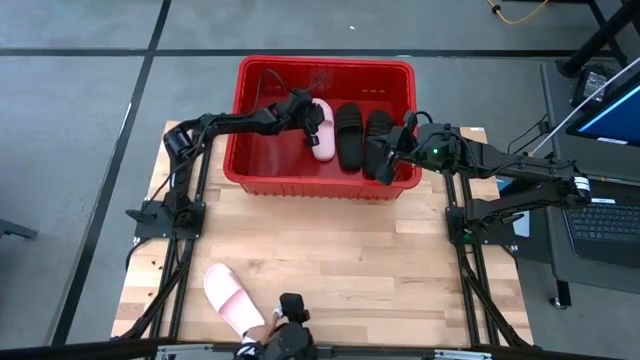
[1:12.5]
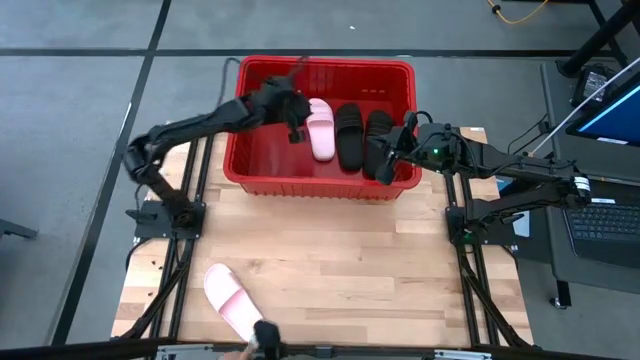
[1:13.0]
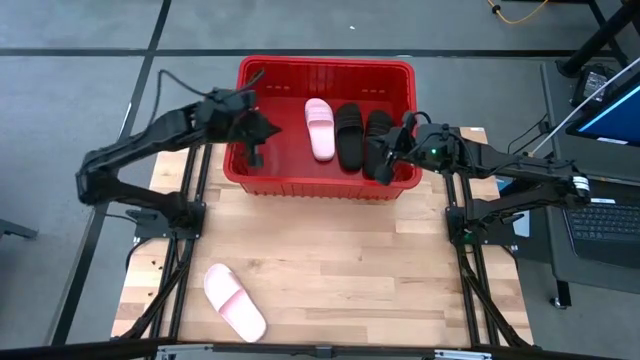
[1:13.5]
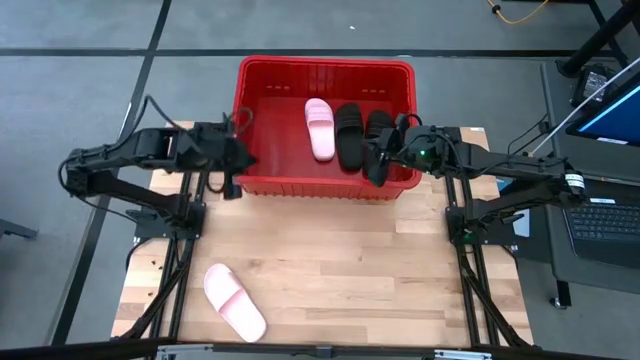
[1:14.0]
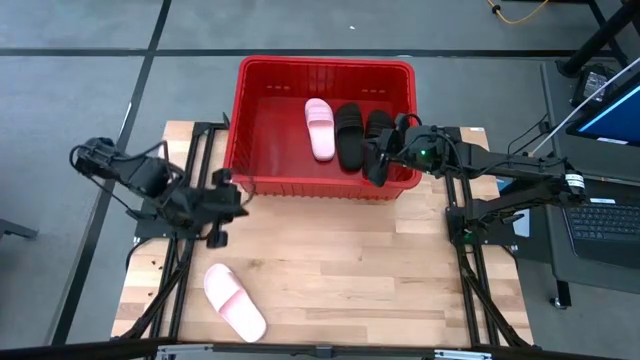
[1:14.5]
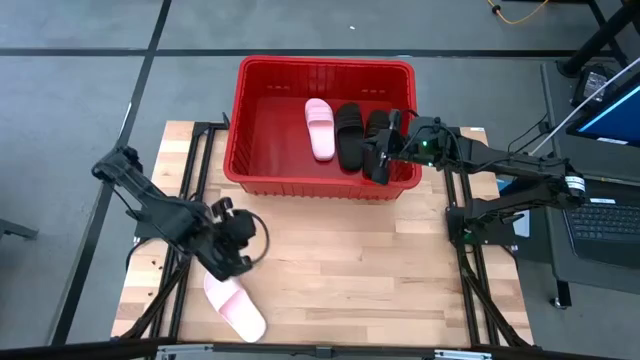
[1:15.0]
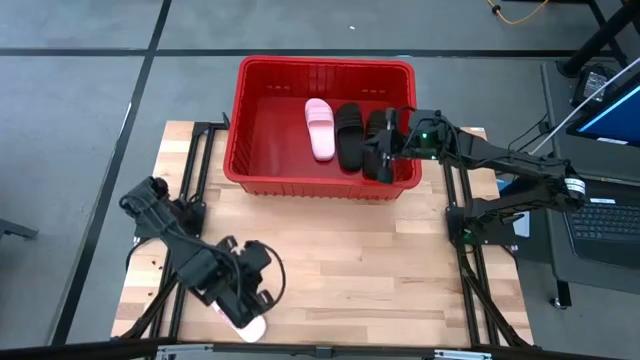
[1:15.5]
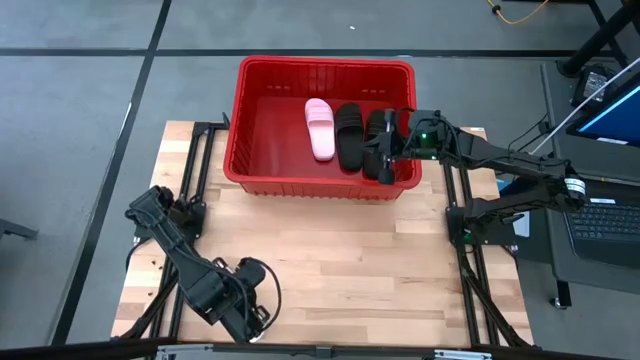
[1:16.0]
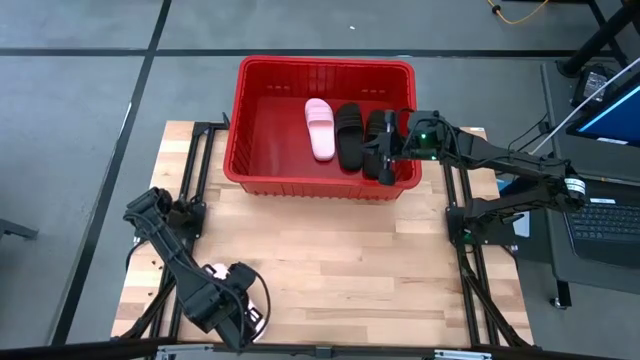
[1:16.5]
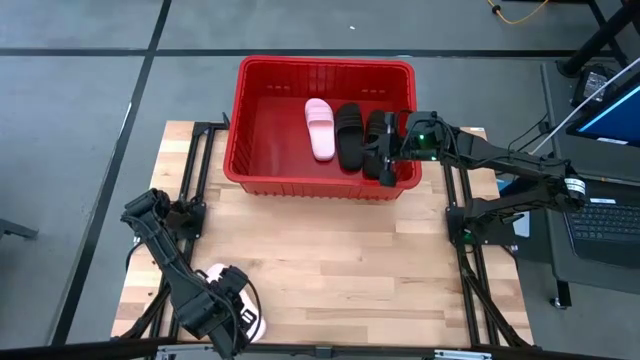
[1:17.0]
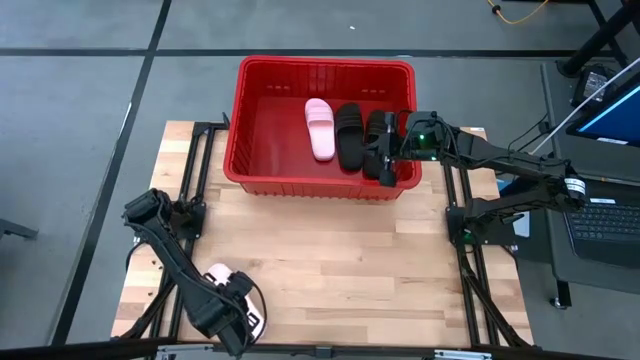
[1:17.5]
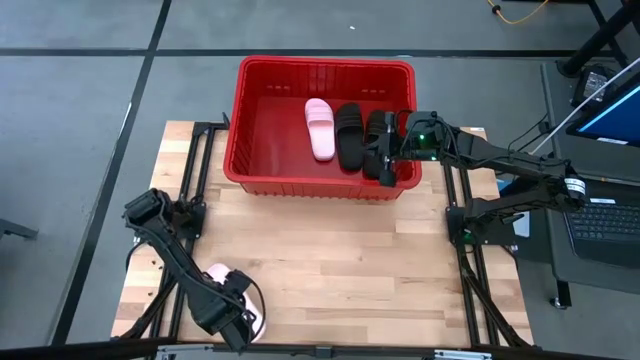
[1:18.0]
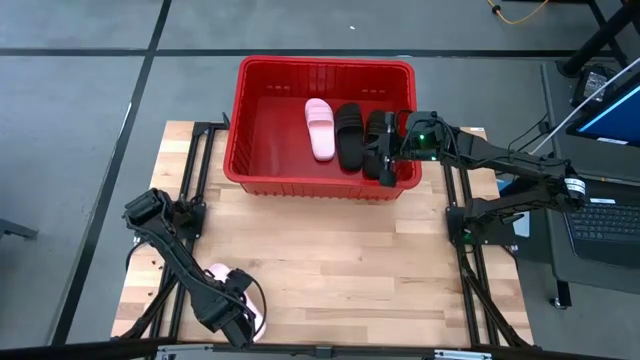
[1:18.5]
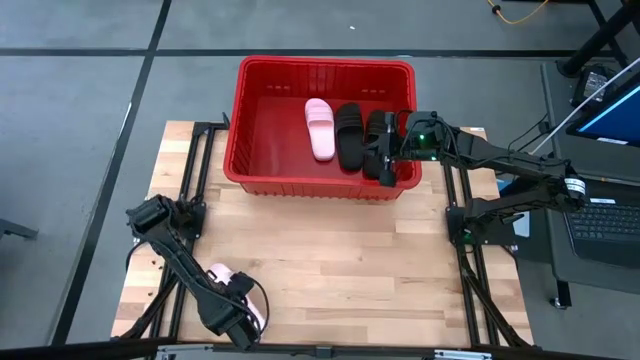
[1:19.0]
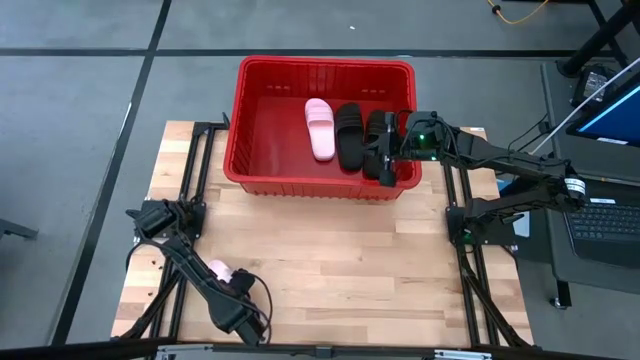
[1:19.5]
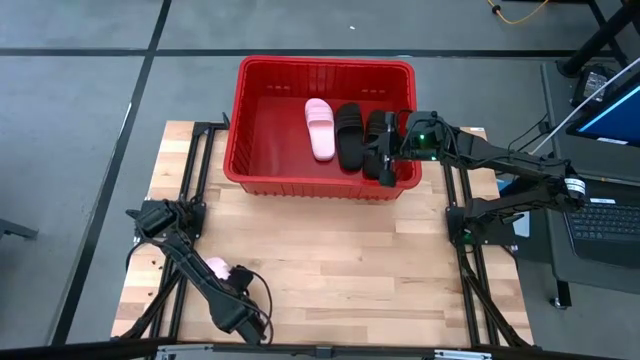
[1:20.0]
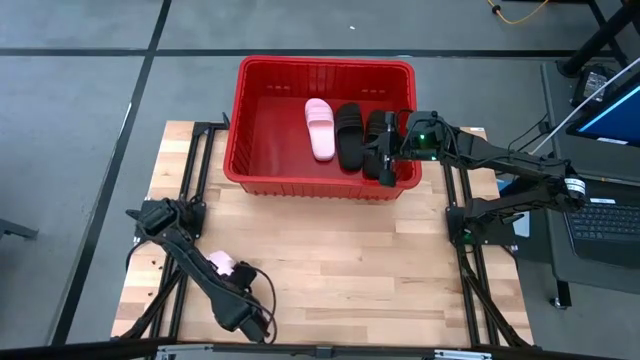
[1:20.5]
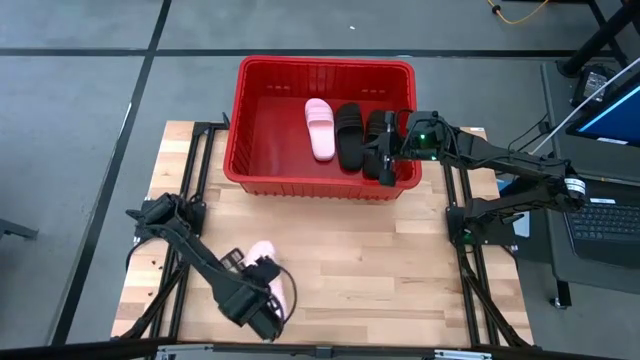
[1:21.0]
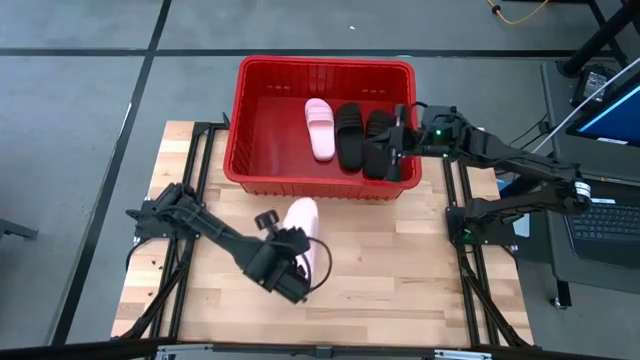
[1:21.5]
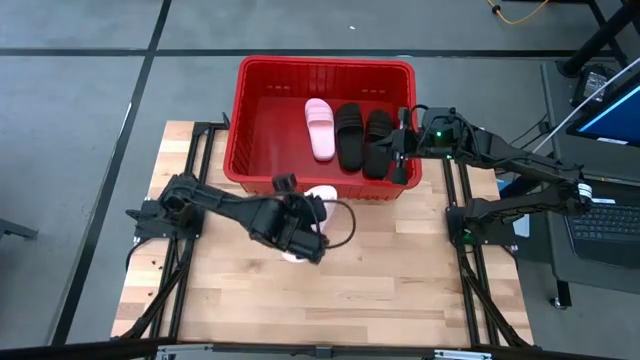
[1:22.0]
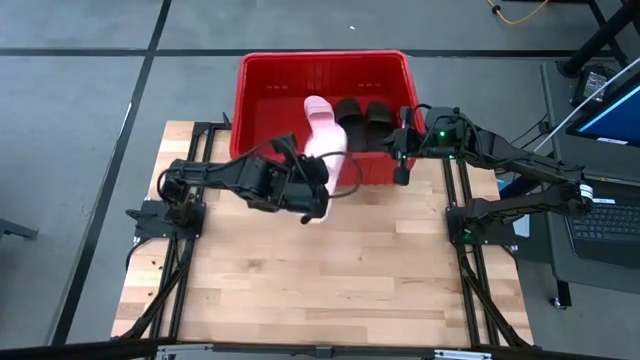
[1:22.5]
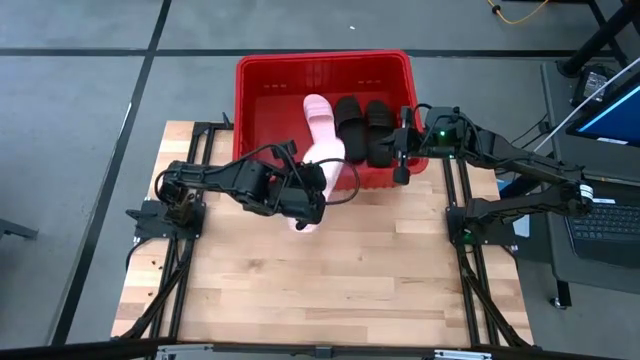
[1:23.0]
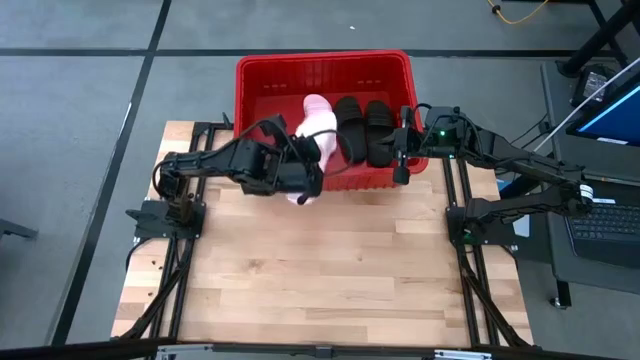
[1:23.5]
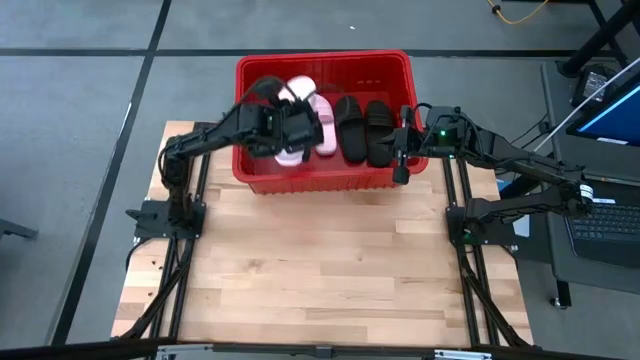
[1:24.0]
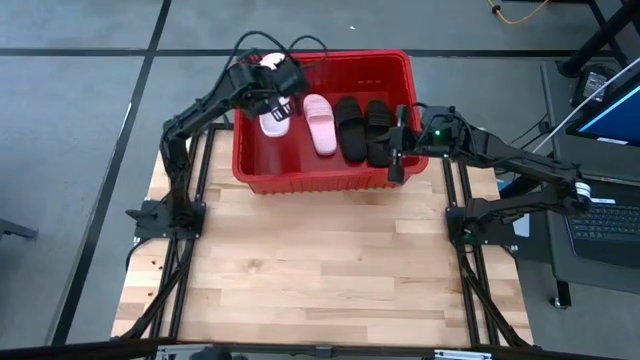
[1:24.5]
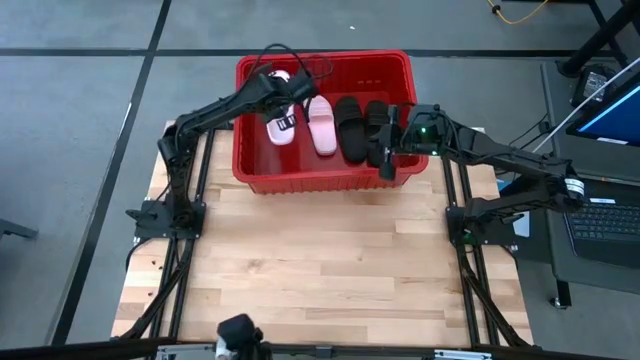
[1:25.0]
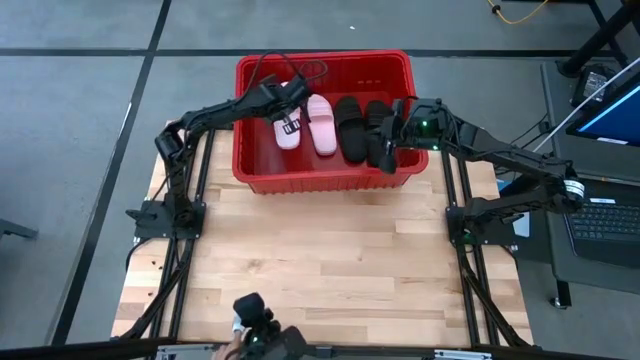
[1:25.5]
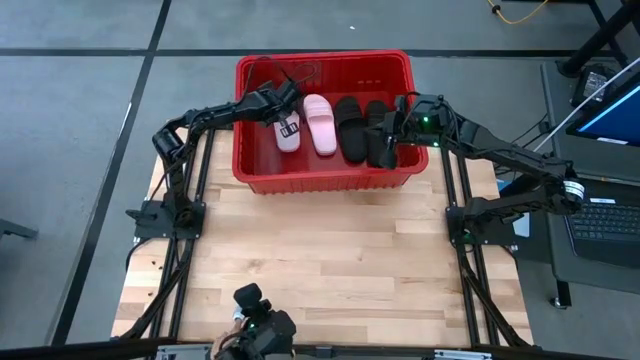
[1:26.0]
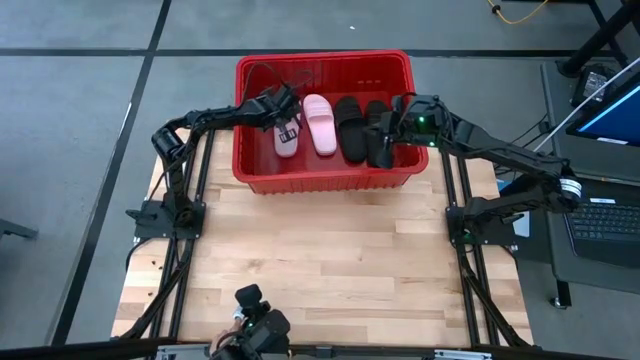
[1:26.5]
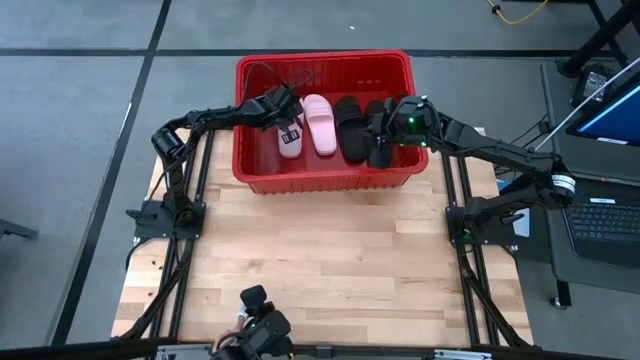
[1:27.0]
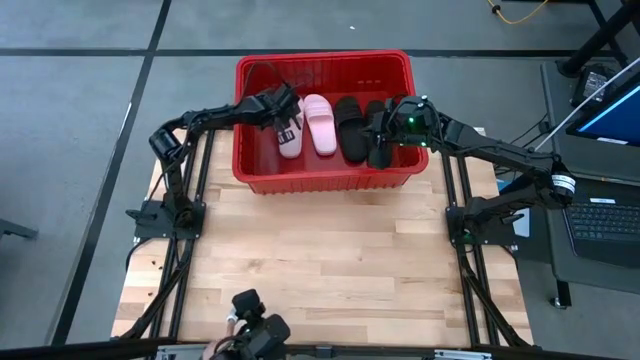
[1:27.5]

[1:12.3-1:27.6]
Task: Pick and place slides into bin
Put the pink slide into the red bin

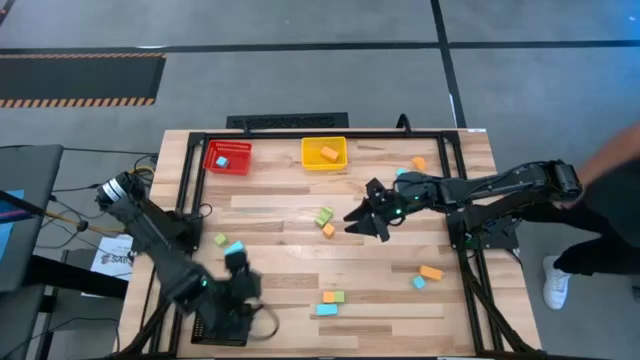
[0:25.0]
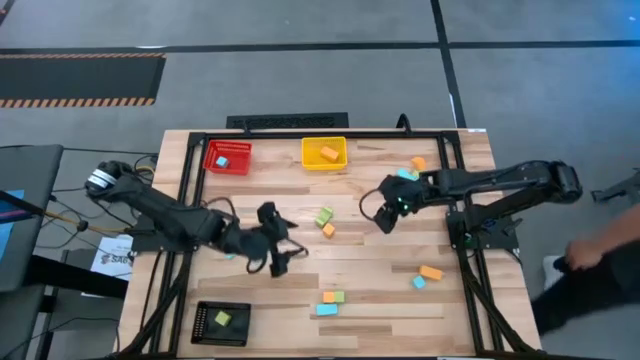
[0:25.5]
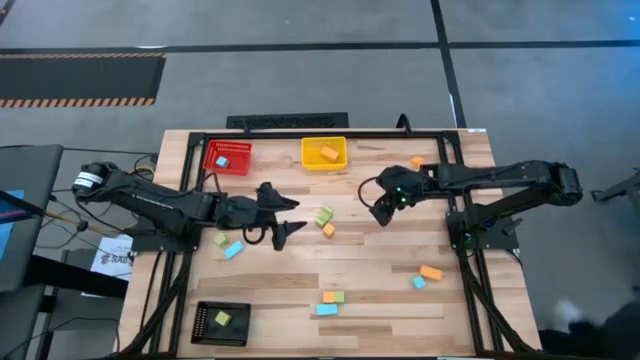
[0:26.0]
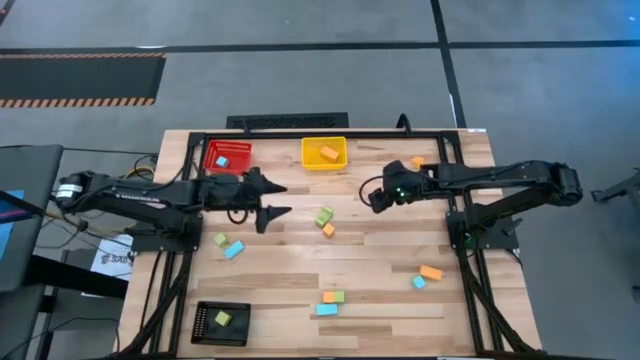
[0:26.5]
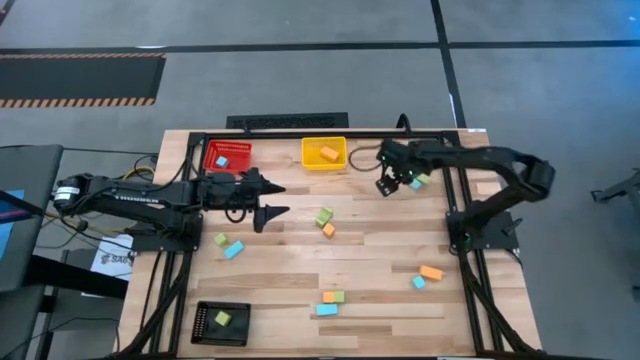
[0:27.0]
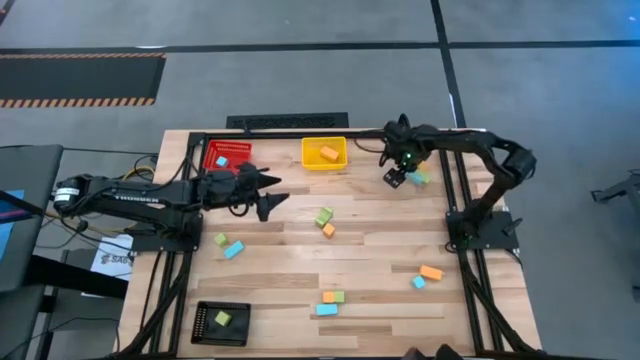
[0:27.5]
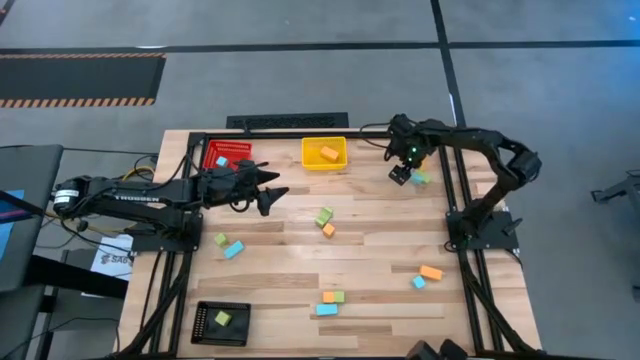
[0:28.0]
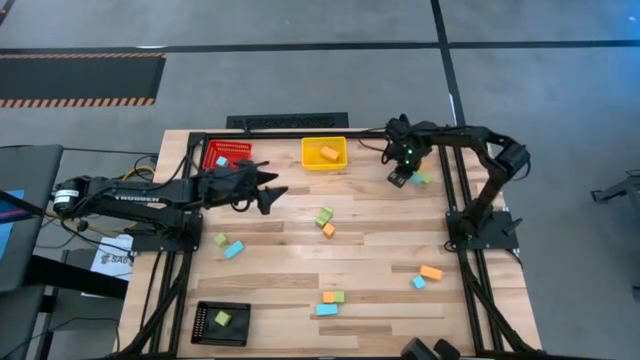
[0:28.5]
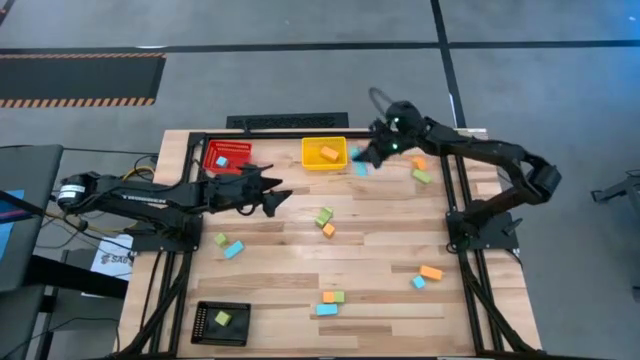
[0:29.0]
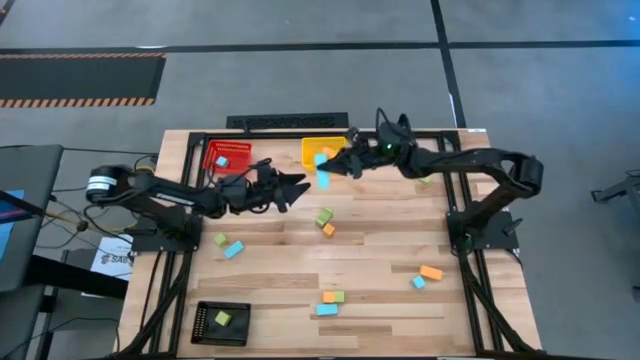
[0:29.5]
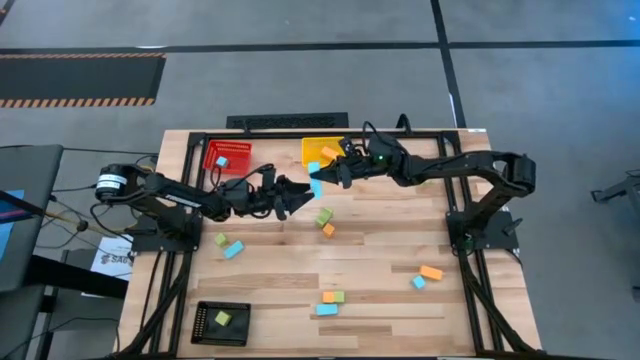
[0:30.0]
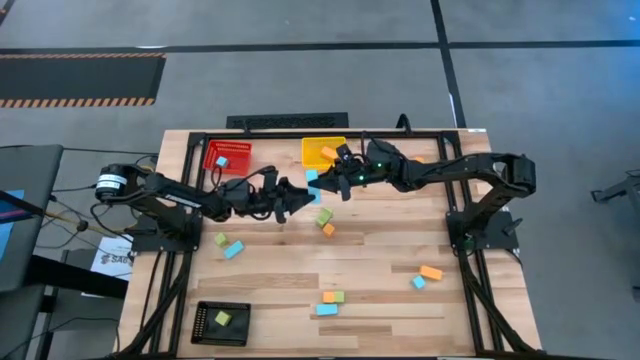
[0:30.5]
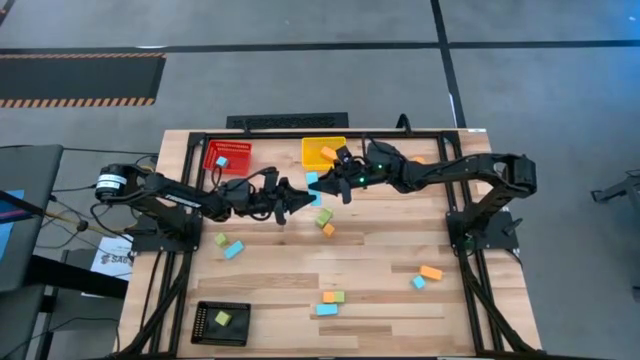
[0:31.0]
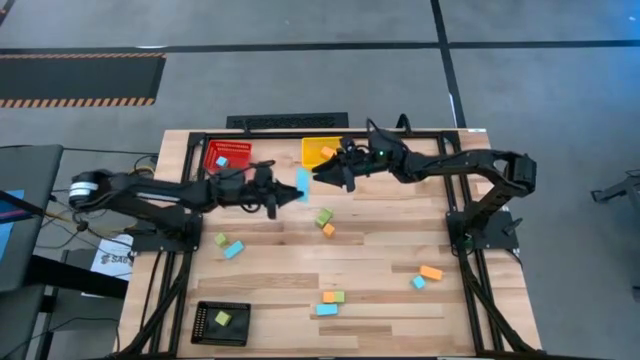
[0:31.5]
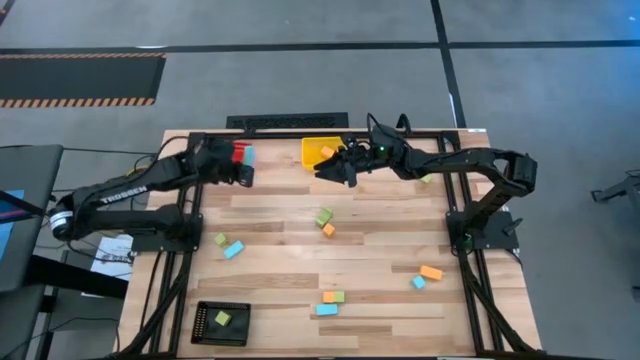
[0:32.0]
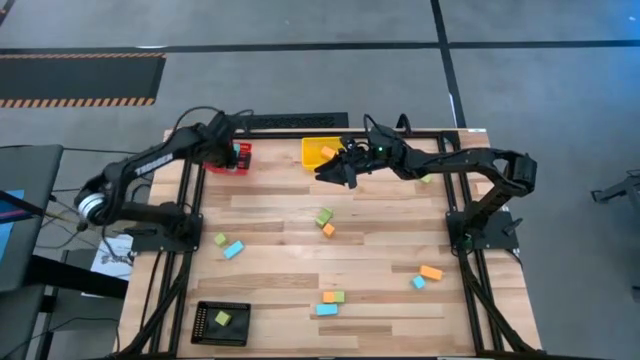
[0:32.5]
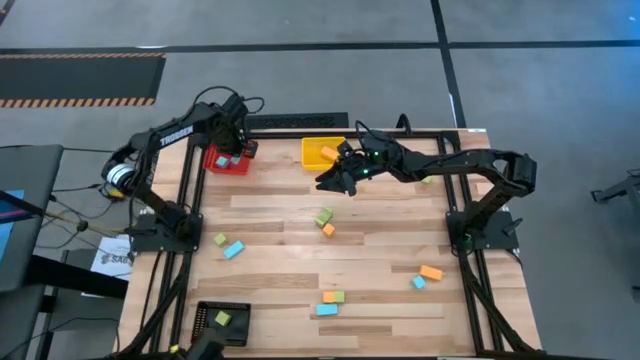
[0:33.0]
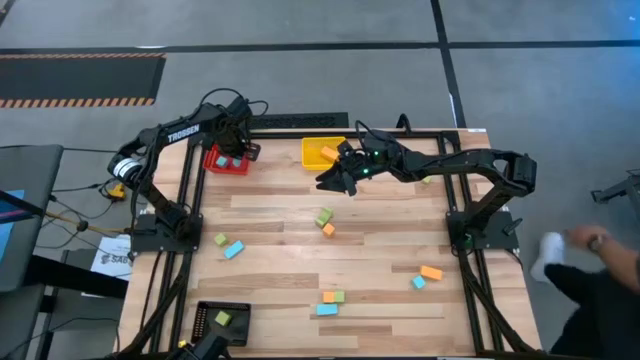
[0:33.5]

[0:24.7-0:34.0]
Task: Sort & place blocks by color
Put the wooden blue block into the red bin
